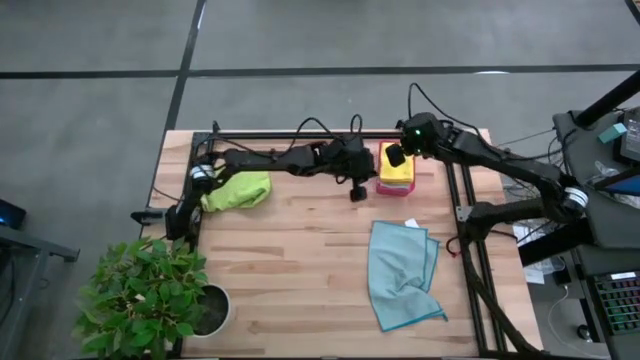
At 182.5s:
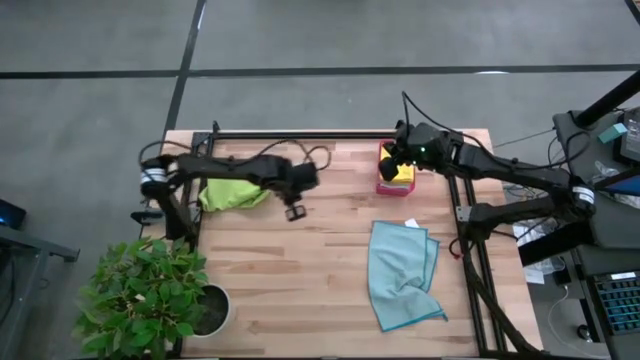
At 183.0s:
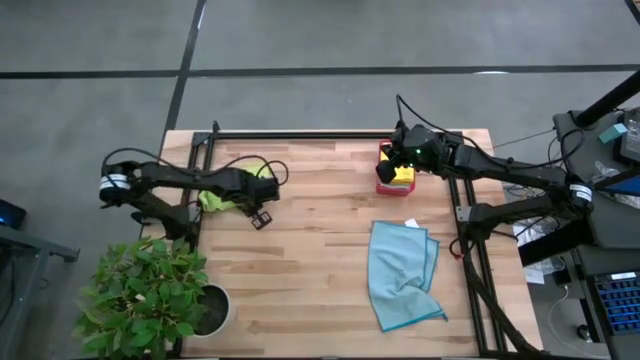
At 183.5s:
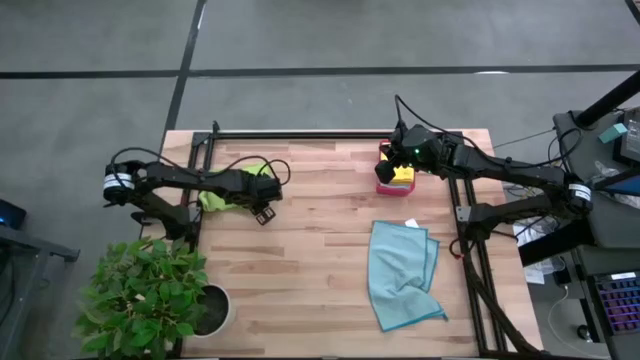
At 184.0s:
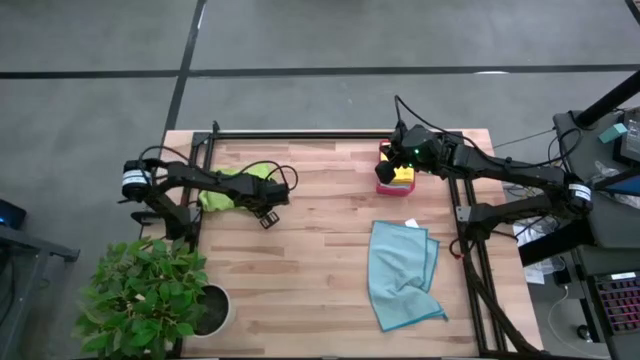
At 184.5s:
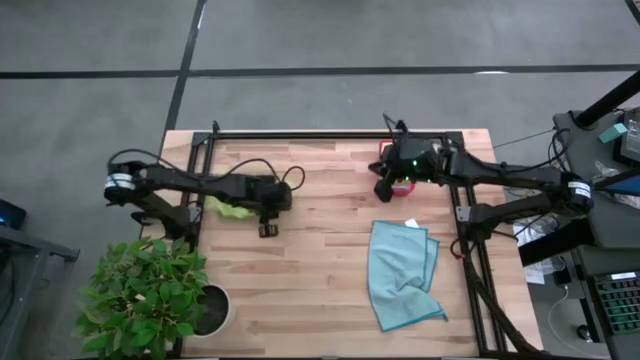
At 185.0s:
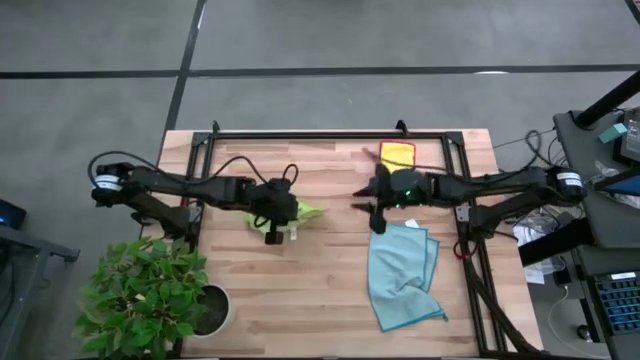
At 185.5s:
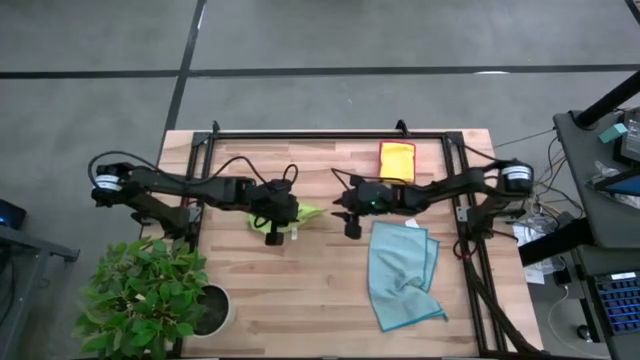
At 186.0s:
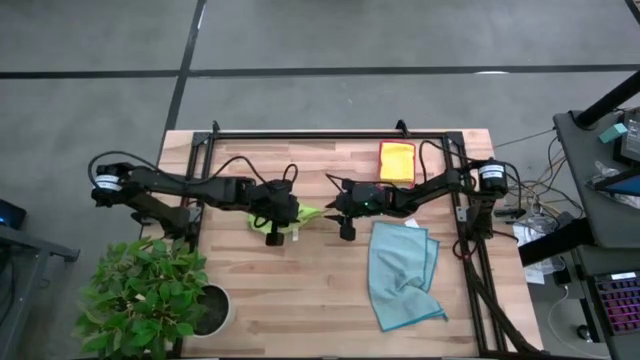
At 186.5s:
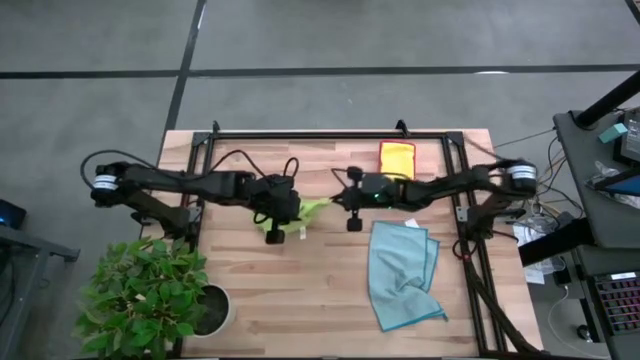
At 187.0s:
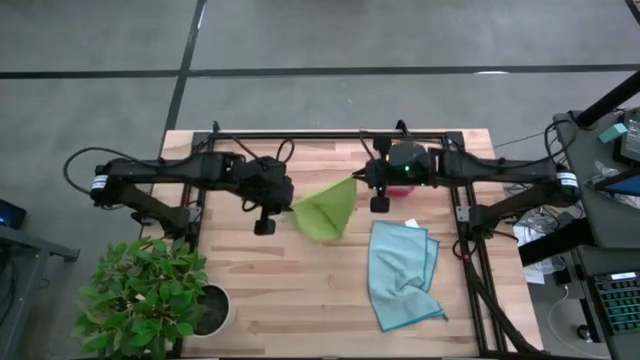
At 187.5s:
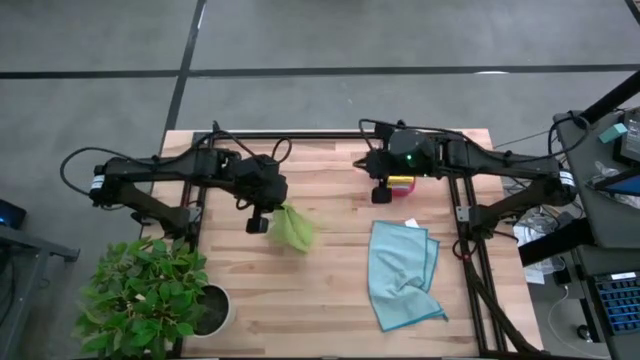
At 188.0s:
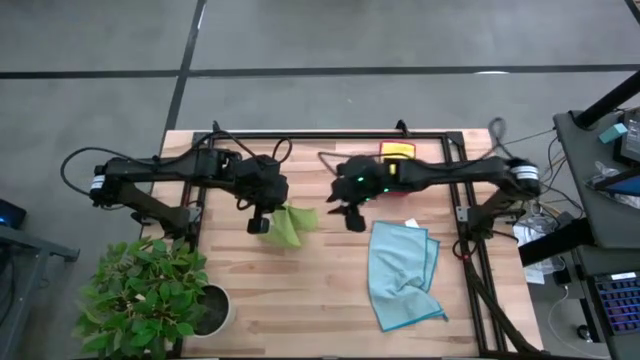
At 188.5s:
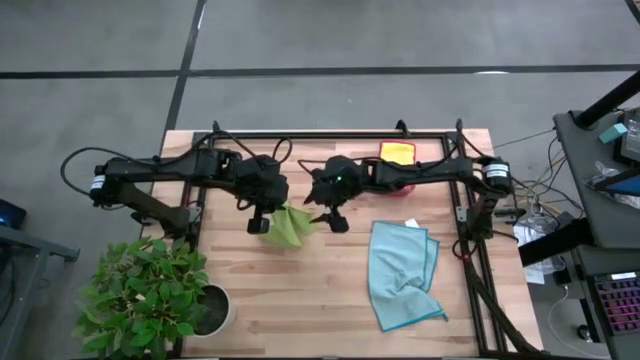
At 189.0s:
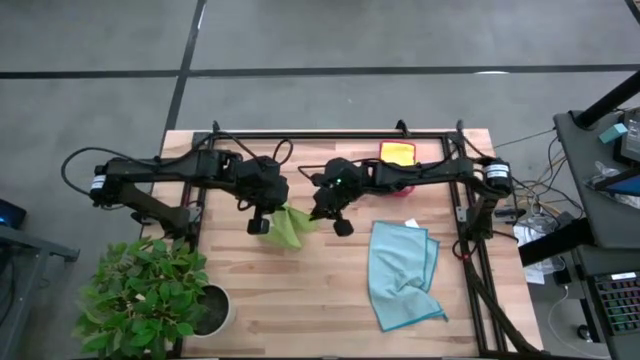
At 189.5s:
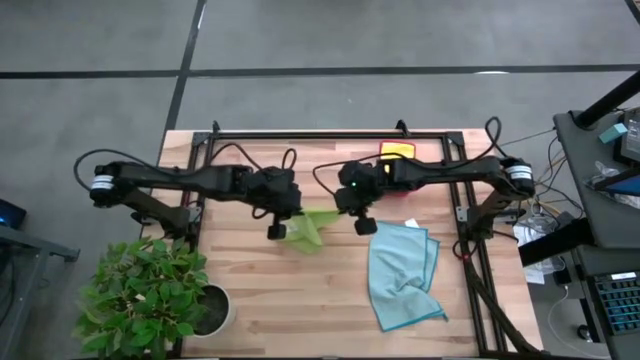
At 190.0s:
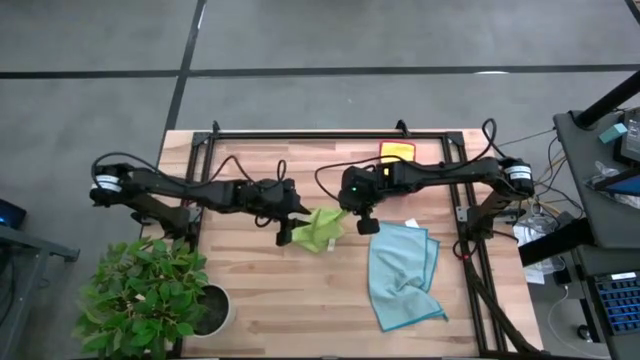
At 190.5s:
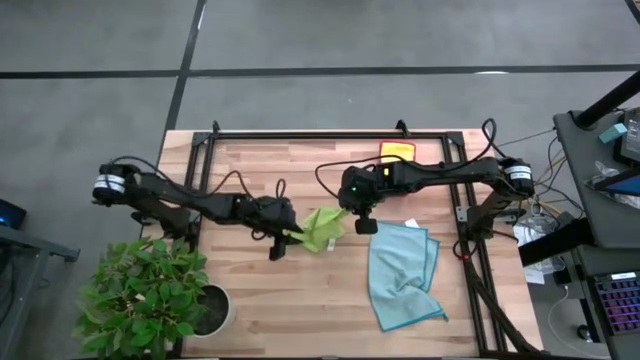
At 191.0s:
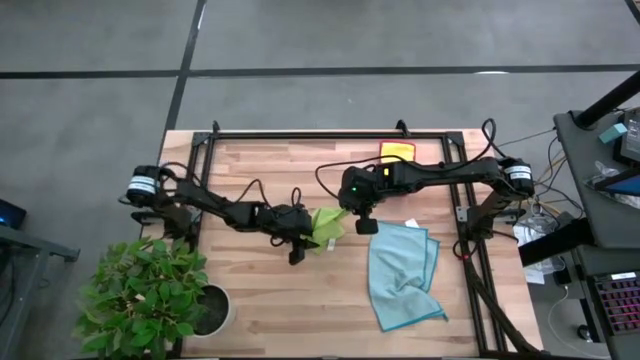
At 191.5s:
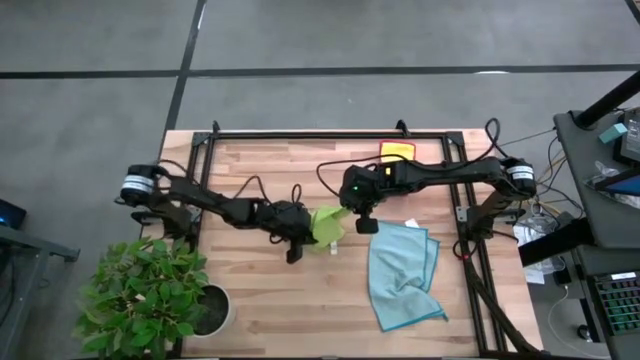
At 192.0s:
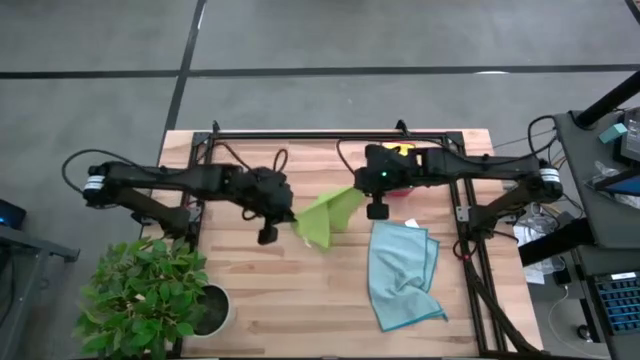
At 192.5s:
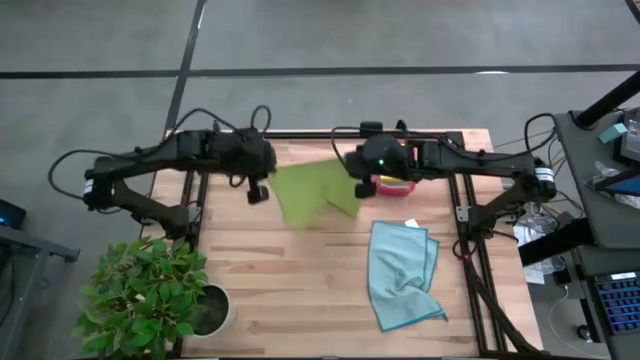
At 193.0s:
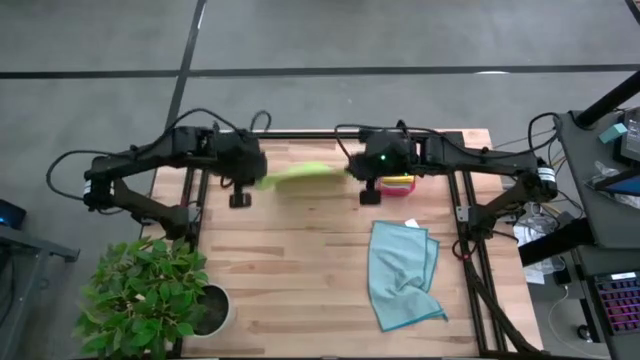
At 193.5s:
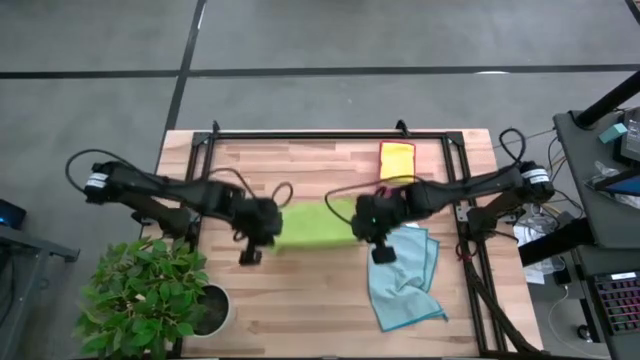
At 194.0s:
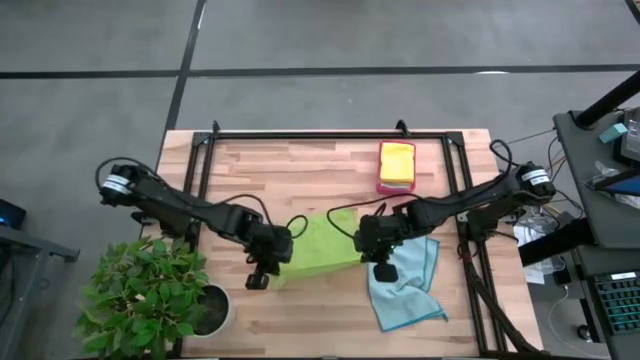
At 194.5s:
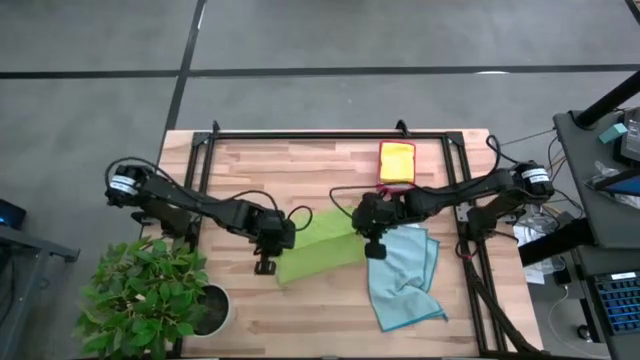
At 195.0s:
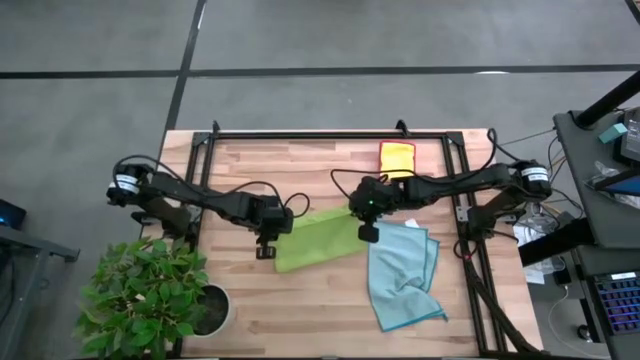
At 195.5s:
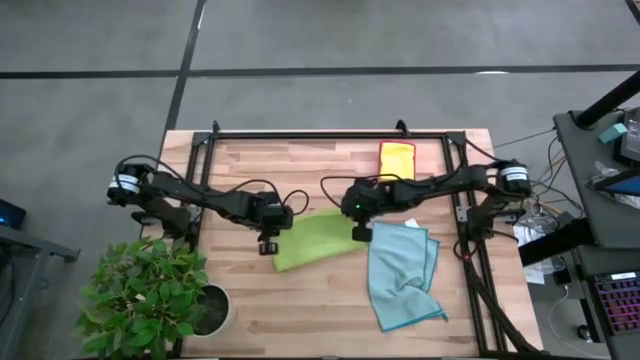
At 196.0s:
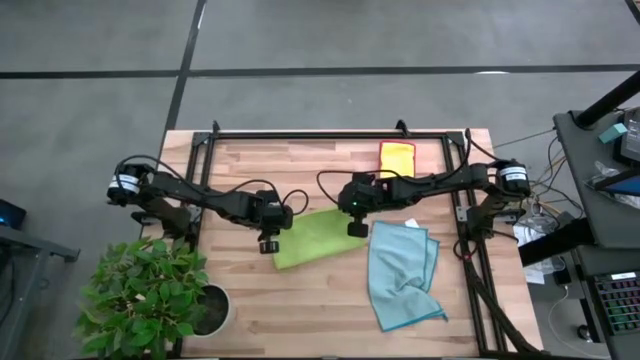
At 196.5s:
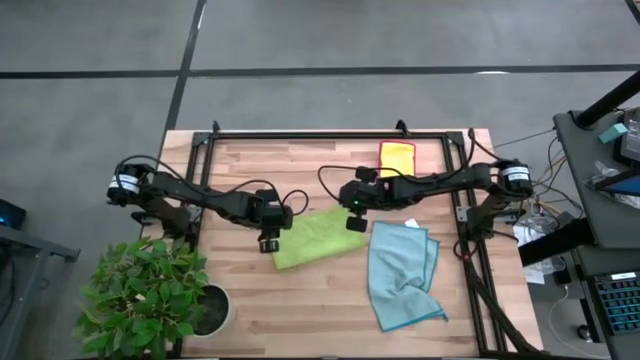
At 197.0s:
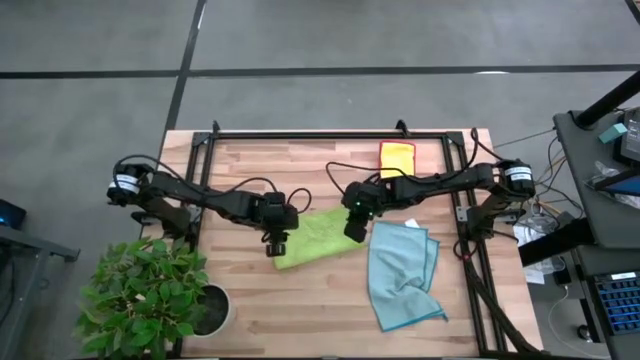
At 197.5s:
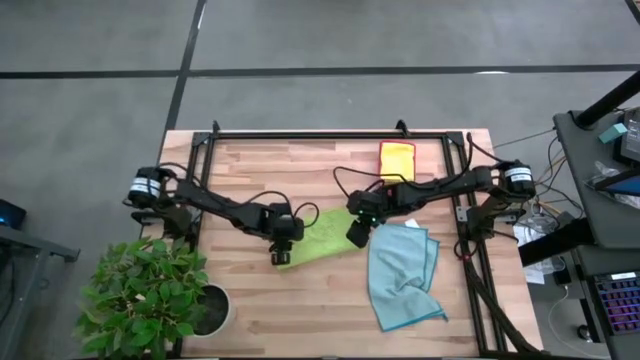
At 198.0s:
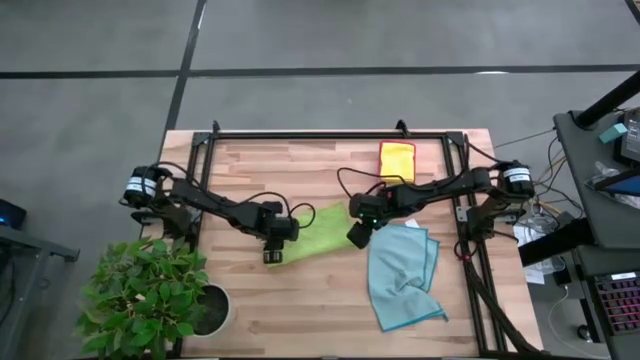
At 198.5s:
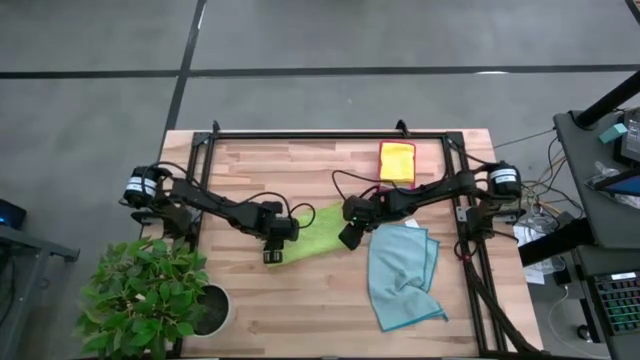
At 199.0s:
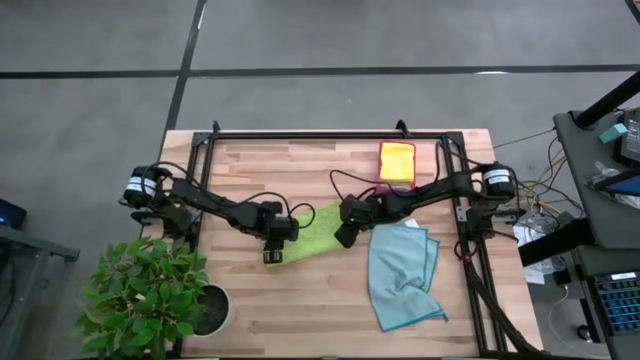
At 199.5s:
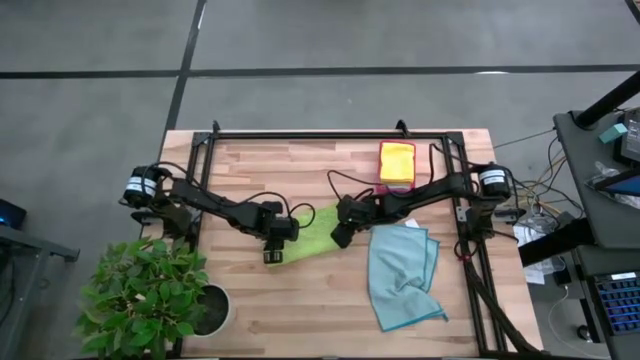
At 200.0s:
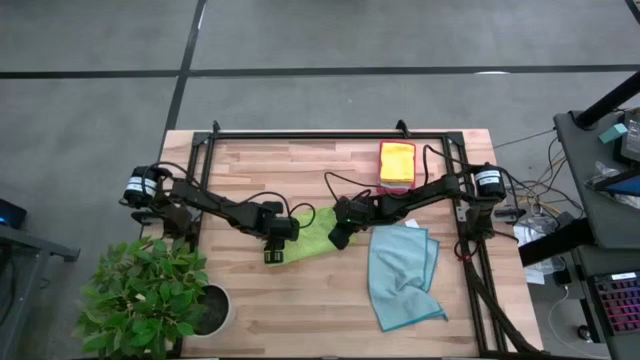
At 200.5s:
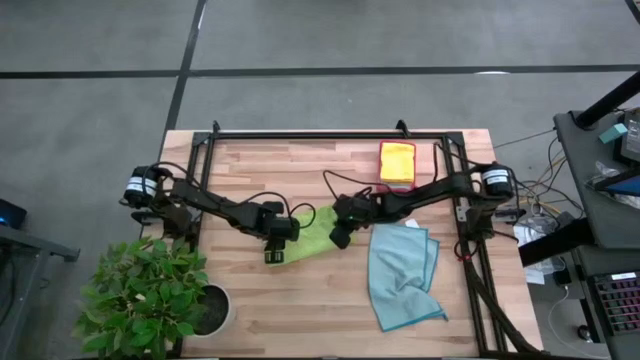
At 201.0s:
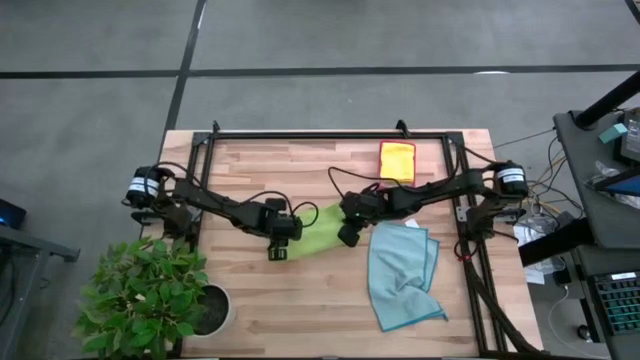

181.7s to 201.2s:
Task: Fold microfiber towels
Fold the green microfiber towel

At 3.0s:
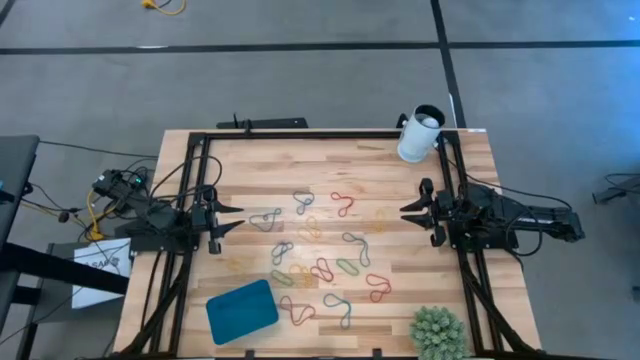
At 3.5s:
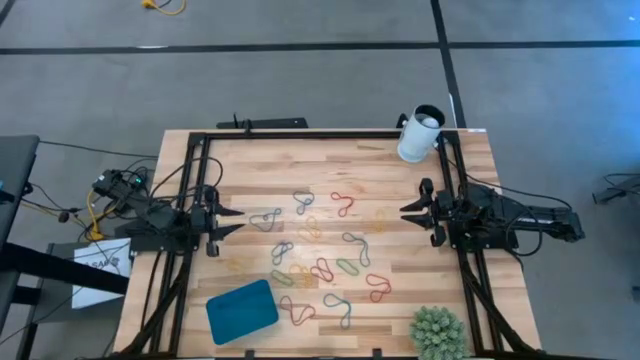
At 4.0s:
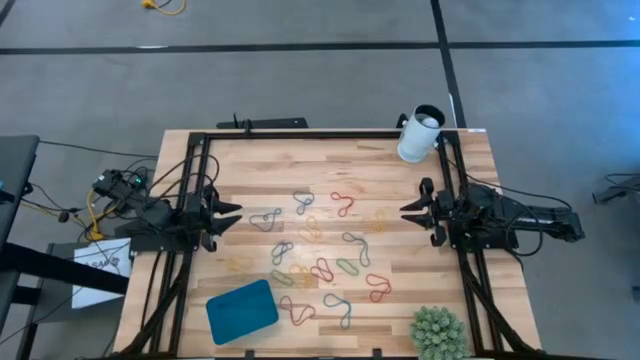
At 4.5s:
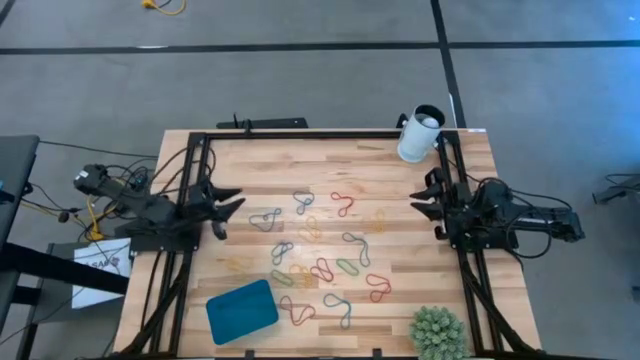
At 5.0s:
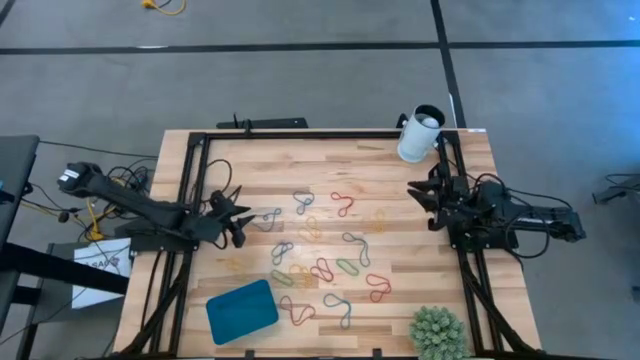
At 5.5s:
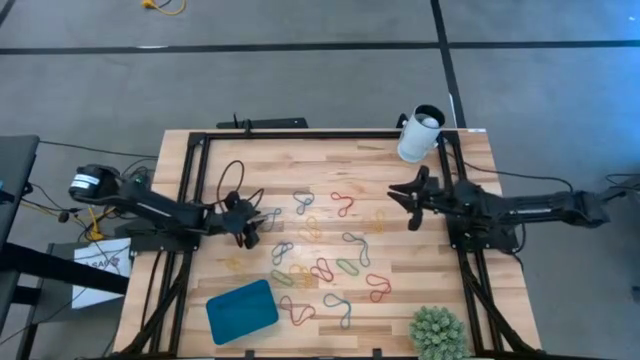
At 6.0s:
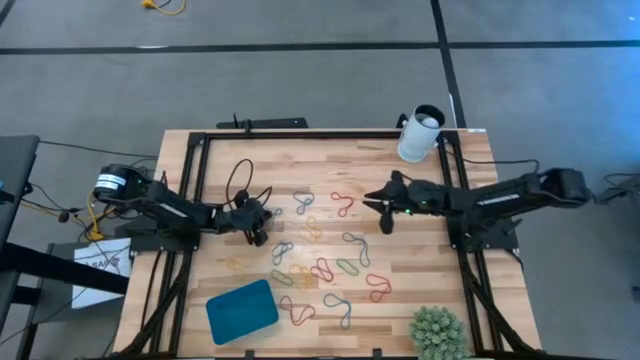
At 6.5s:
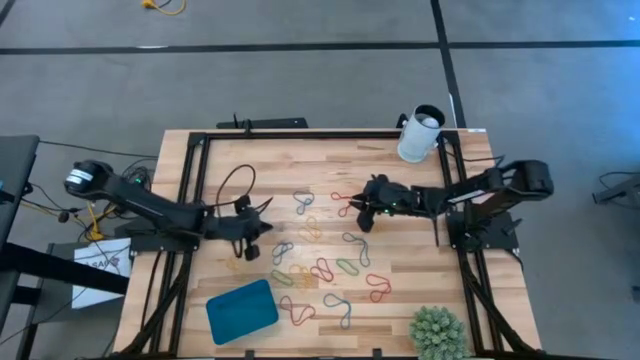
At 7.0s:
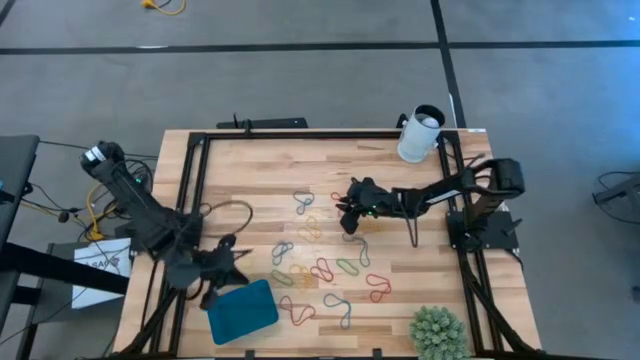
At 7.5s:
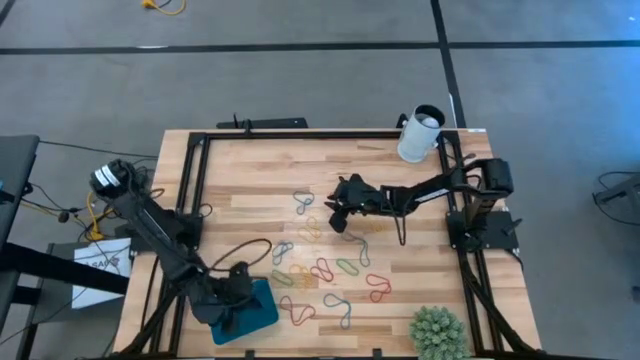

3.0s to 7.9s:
Task: Pick and place items into bin
Put the blue rubber band into the blue bin
